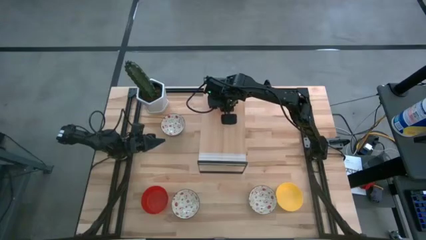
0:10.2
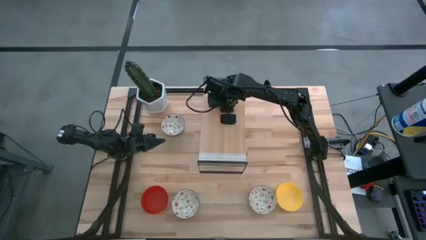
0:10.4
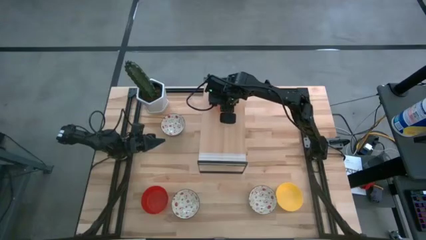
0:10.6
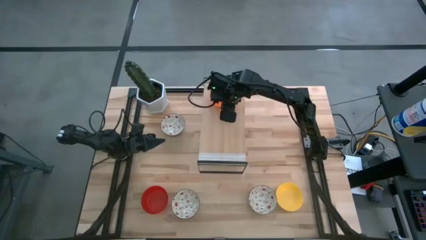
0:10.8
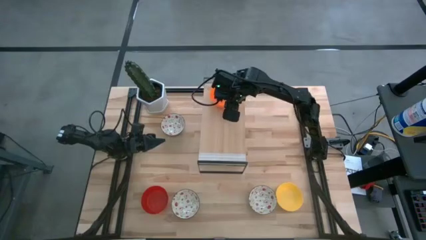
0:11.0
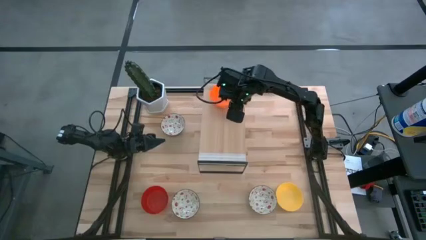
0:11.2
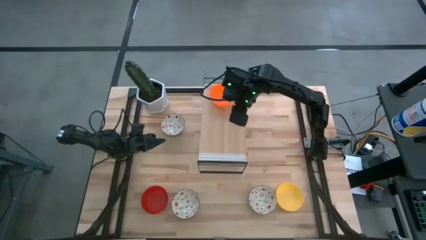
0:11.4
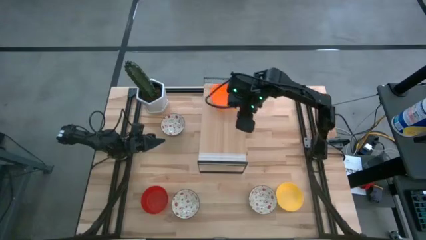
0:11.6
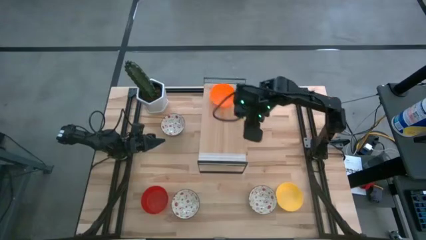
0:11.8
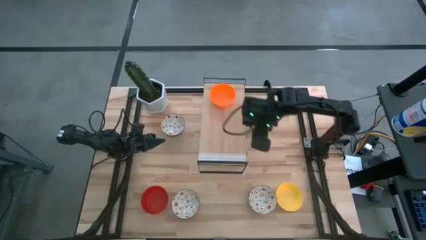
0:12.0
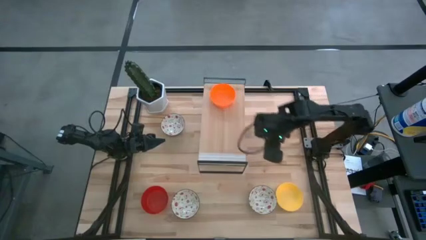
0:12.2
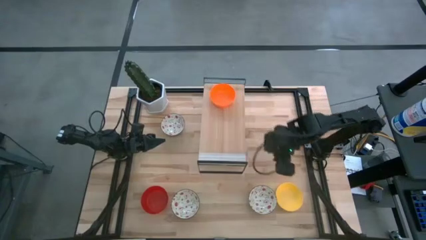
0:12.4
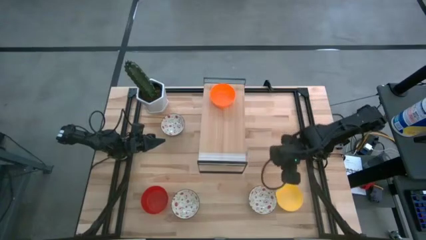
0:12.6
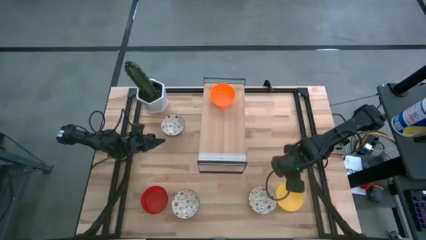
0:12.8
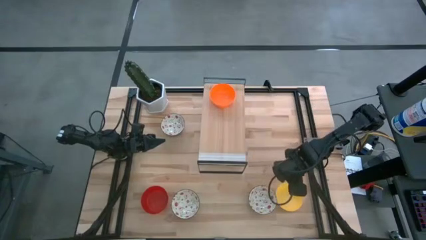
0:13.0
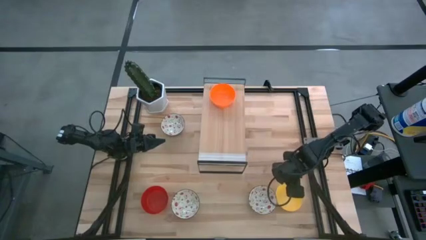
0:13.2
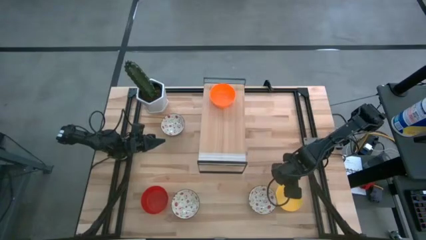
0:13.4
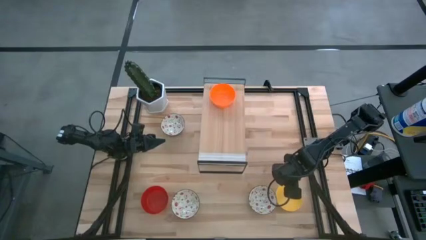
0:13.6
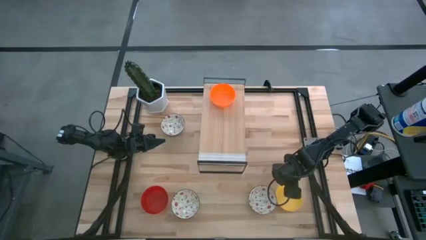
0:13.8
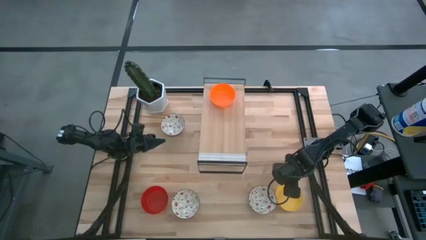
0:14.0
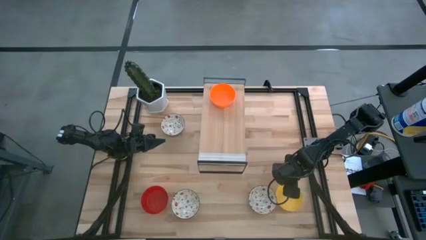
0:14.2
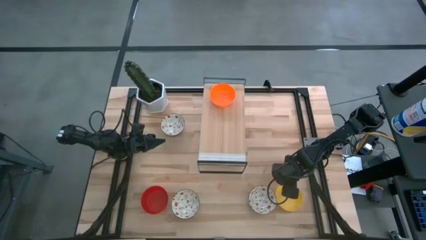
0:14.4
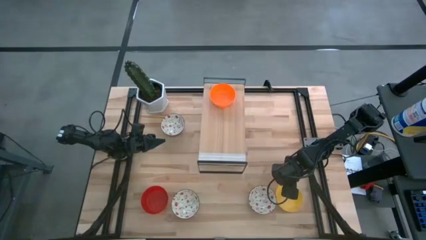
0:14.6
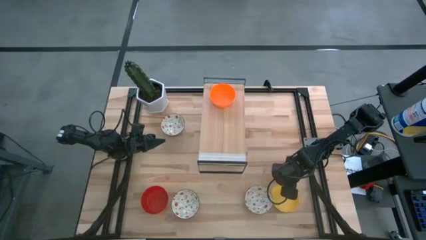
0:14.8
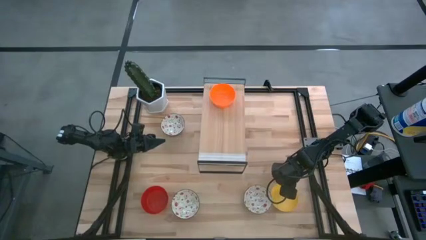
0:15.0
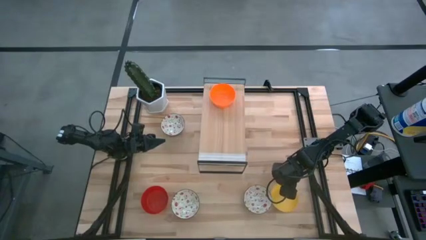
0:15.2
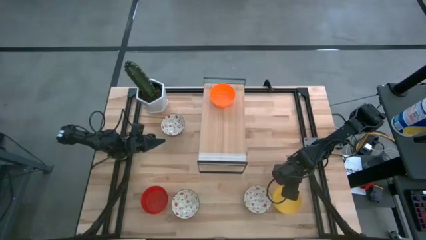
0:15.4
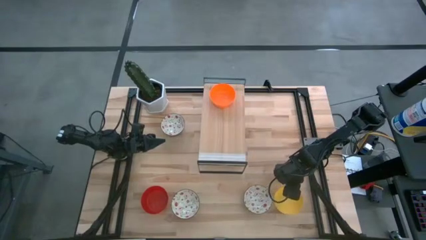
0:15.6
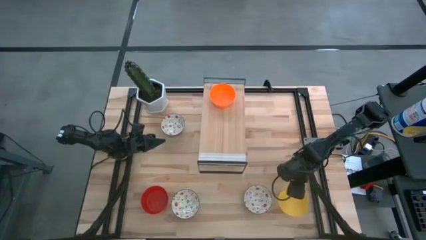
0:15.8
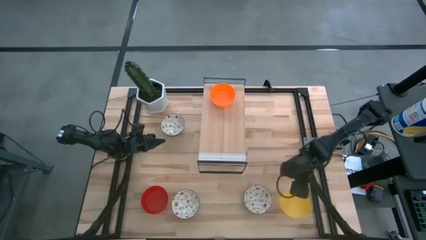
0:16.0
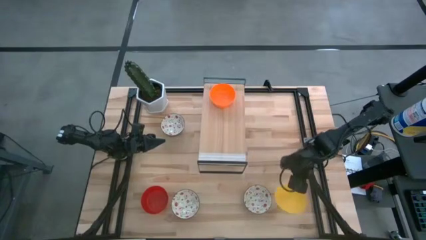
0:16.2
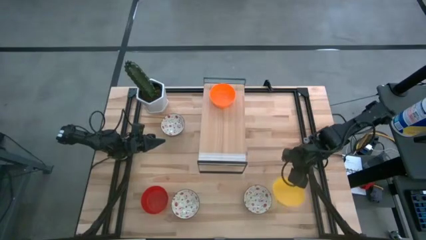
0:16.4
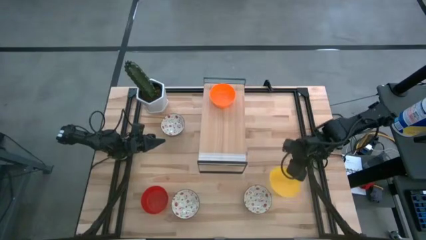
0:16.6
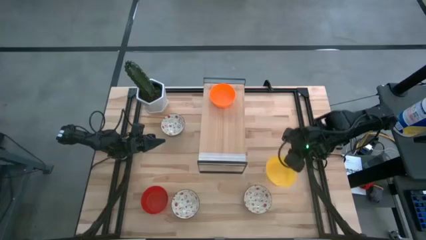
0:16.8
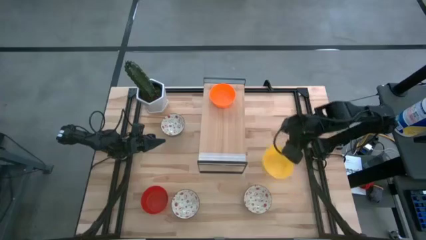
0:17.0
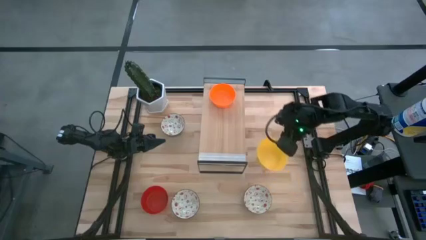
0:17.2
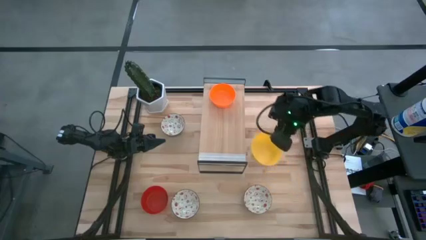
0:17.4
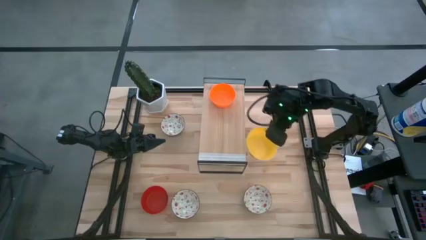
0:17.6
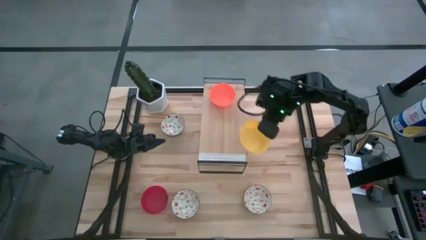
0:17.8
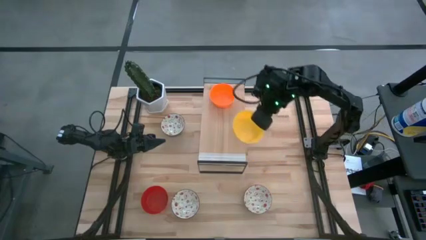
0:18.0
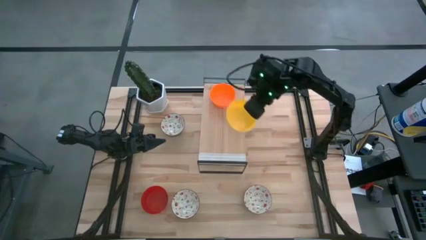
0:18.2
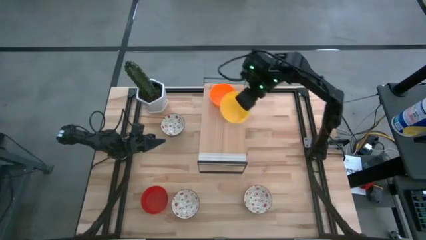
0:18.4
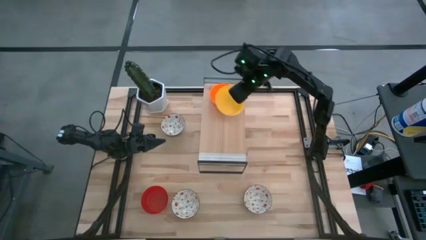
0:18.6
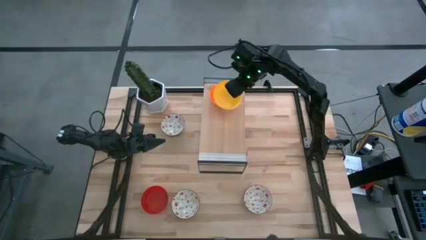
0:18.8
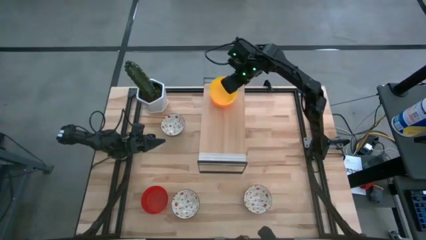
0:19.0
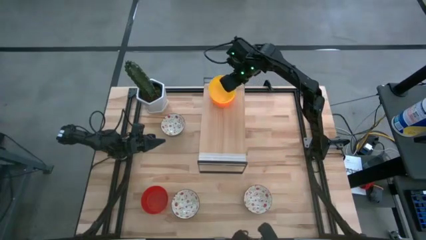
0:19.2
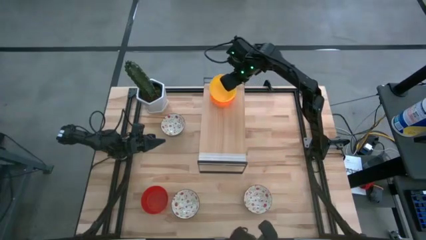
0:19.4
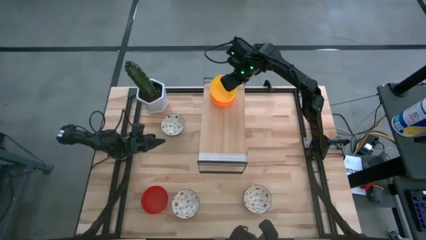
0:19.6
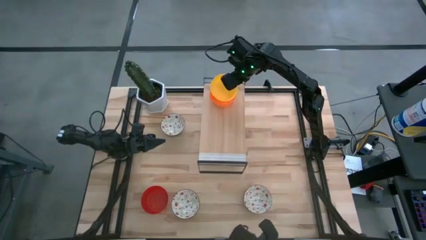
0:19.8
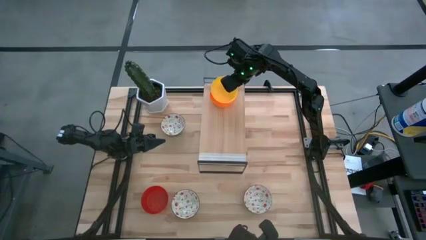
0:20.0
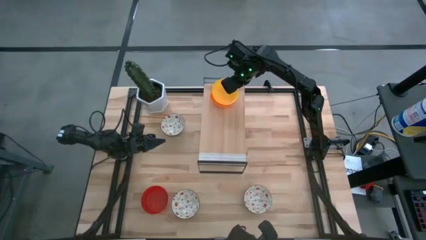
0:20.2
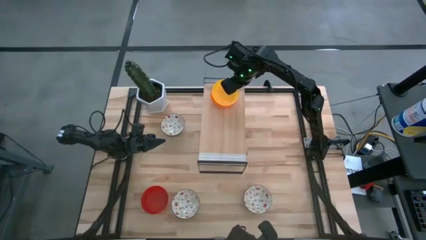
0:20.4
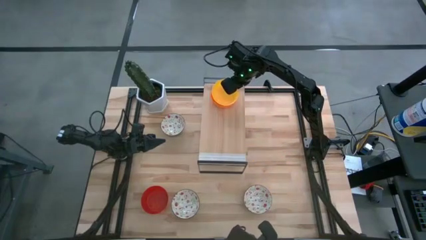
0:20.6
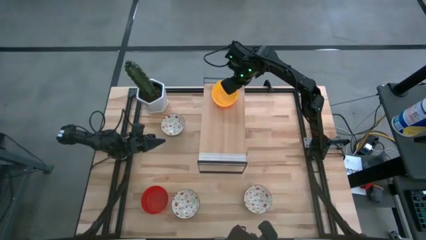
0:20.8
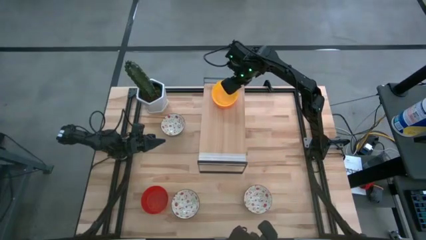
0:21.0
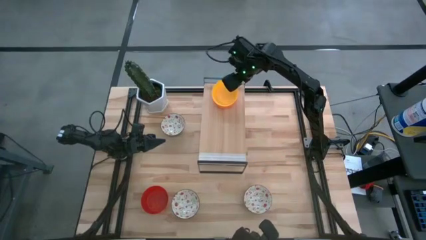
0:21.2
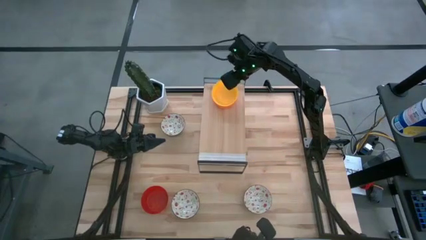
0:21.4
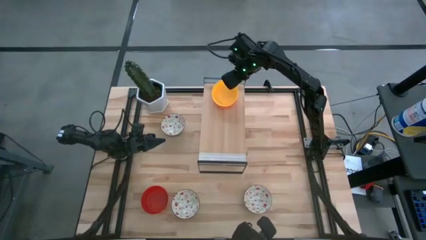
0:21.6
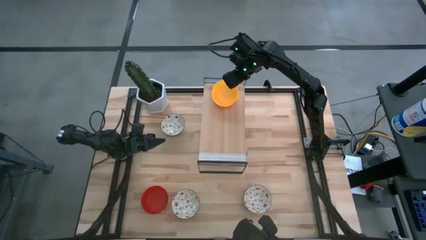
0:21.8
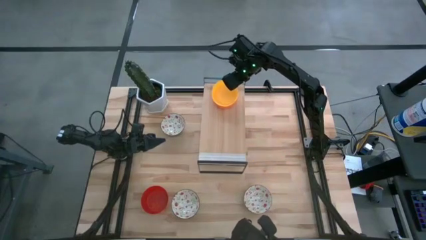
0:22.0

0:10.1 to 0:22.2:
Task: Pick & Place Mini bowls
Stack the yellow bowl on the light orange bowl on the shelf

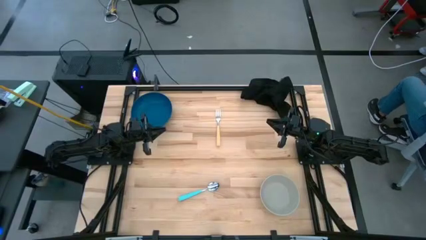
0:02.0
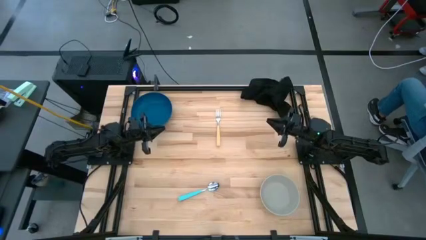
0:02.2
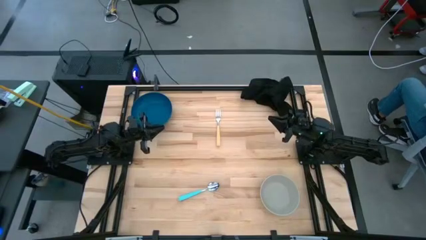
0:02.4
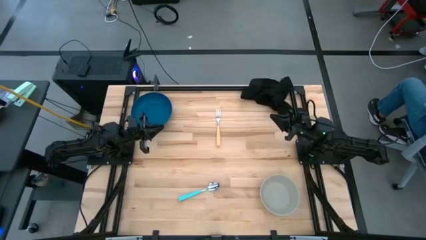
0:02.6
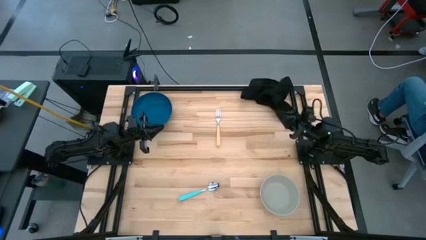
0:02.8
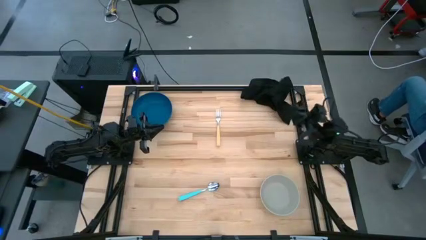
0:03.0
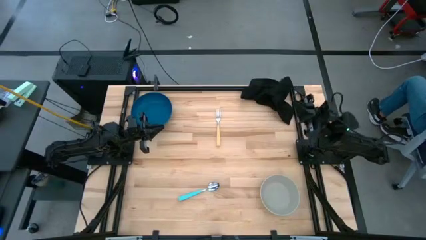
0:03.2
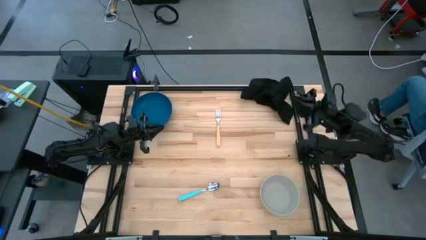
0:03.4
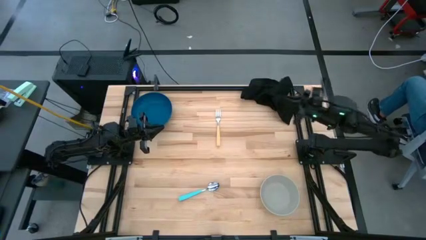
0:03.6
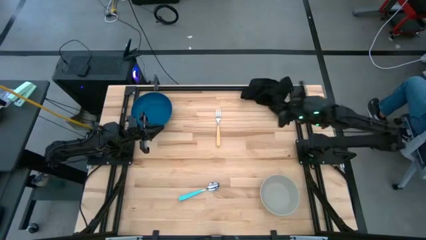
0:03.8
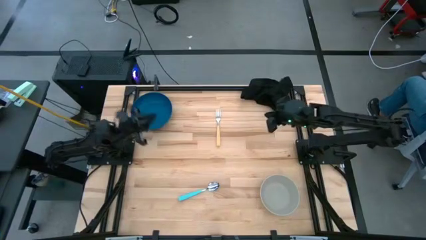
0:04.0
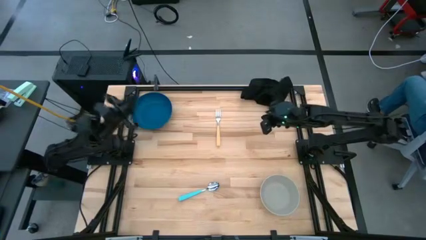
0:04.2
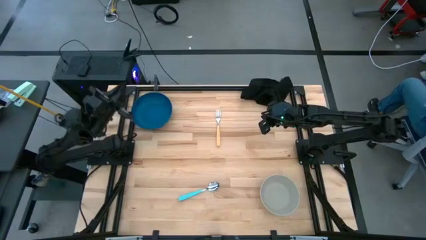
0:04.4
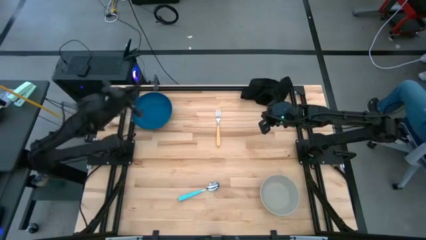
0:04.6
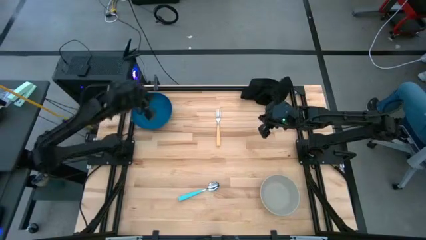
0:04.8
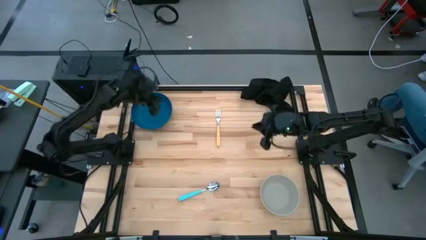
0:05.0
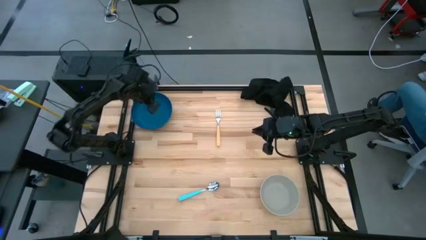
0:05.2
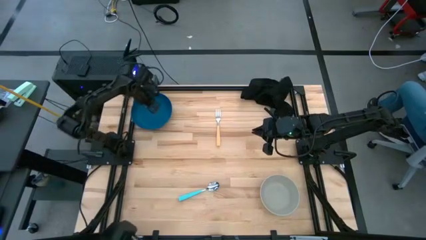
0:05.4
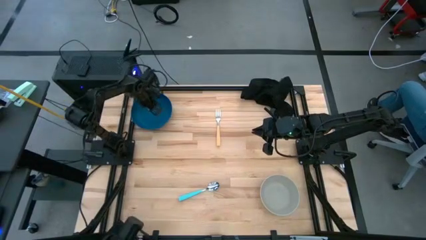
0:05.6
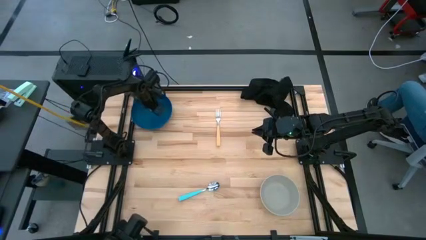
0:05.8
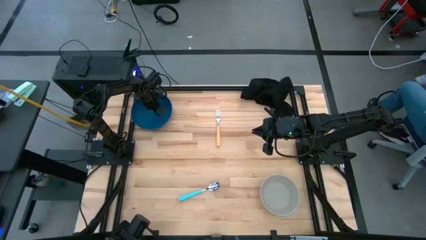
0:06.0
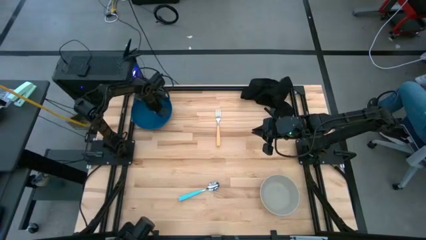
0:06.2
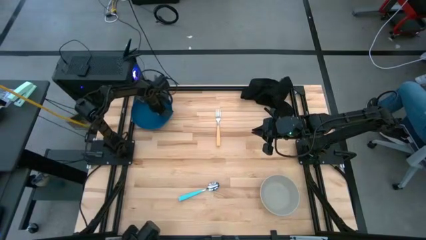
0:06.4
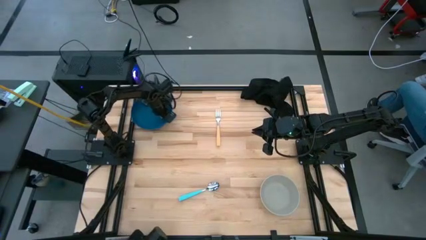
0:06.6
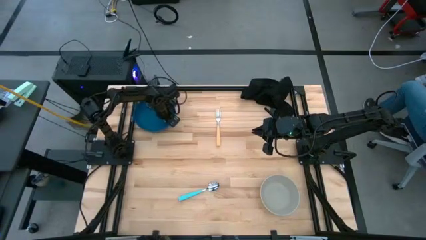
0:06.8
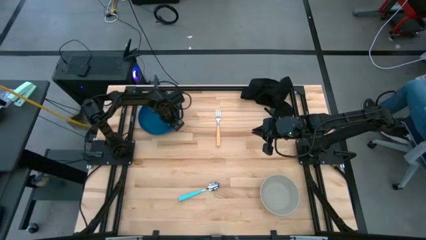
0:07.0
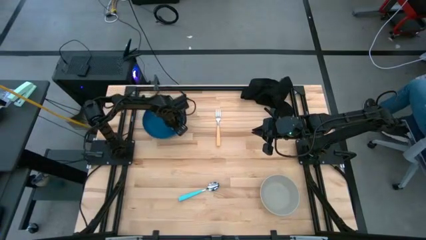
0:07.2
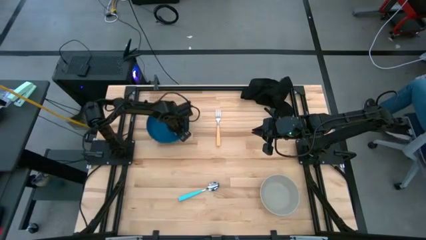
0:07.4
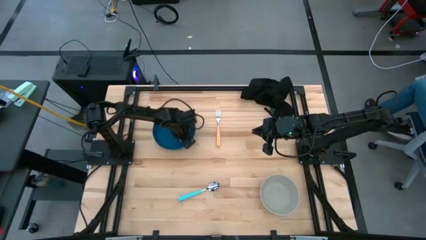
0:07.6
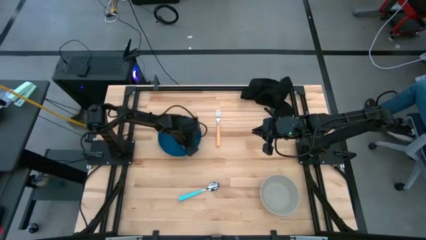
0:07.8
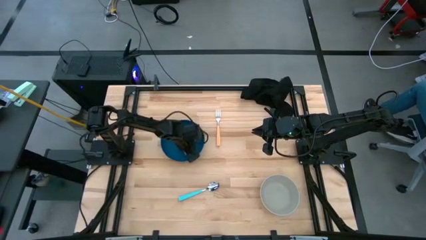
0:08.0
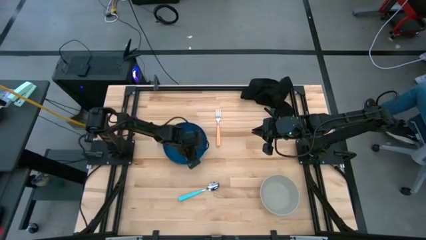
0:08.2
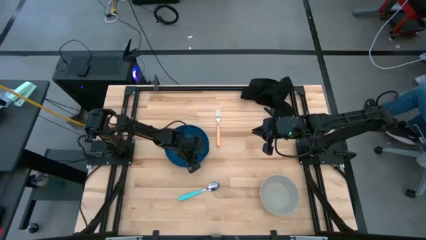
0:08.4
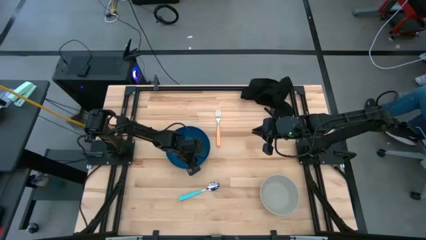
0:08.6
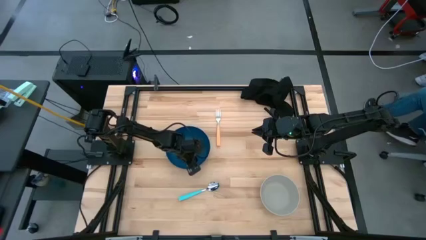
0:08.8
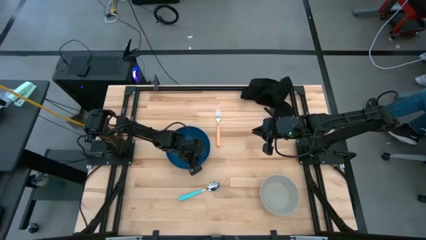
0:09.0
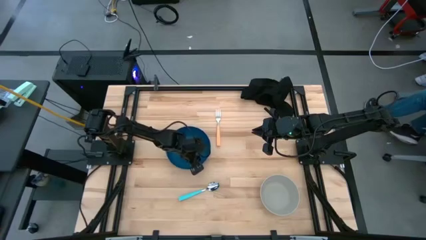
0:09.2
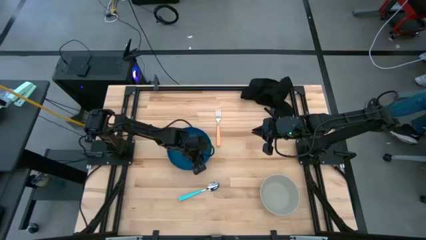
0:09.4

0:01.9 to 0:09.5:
Task: Set table place
Prepare the blue plate on the table
